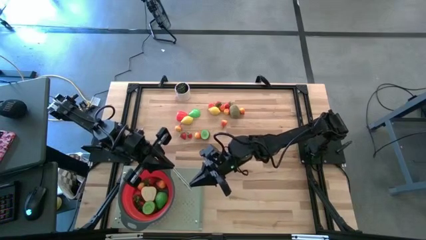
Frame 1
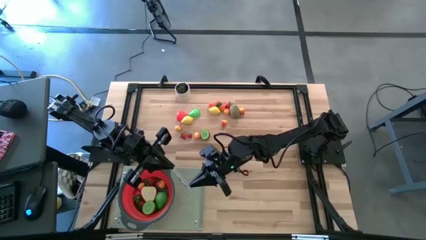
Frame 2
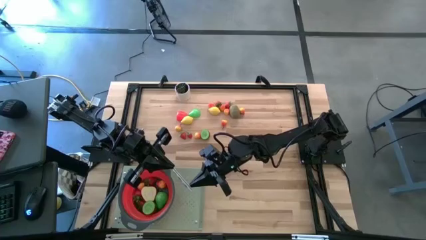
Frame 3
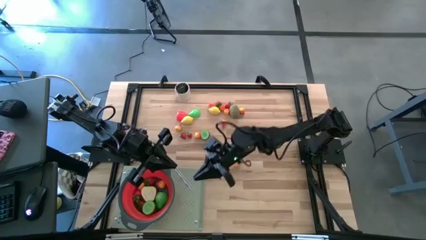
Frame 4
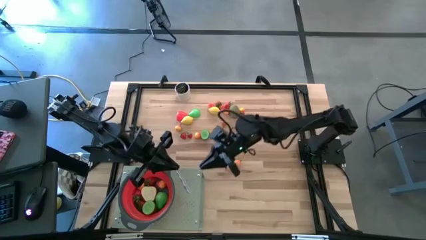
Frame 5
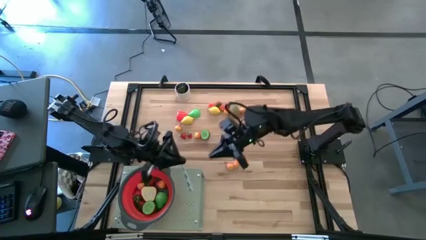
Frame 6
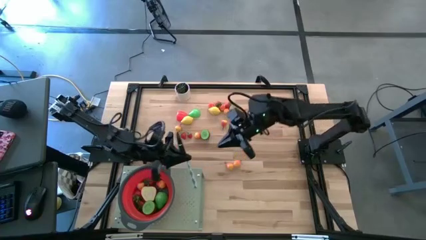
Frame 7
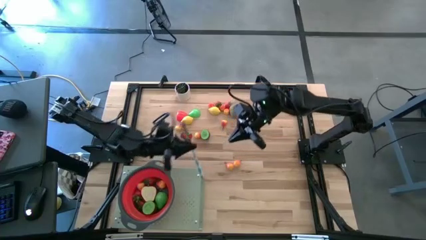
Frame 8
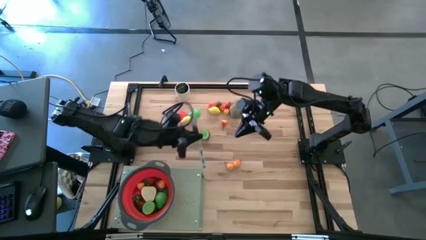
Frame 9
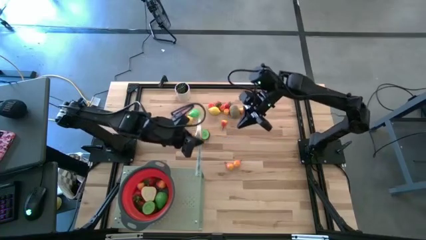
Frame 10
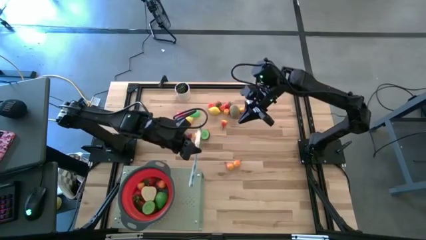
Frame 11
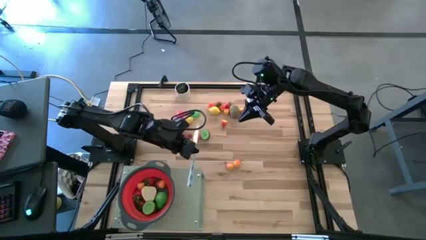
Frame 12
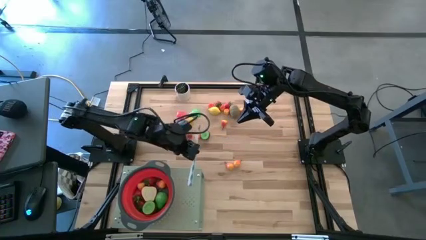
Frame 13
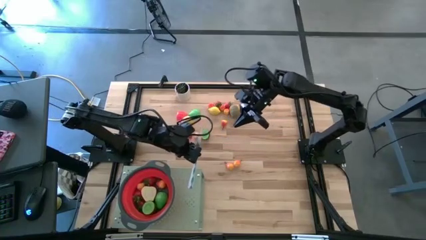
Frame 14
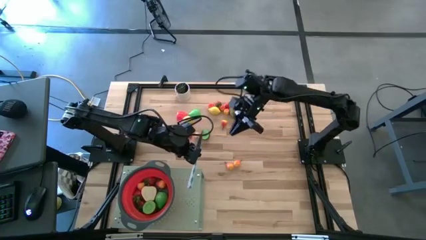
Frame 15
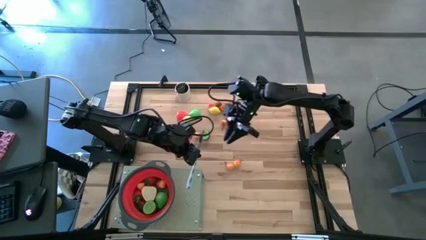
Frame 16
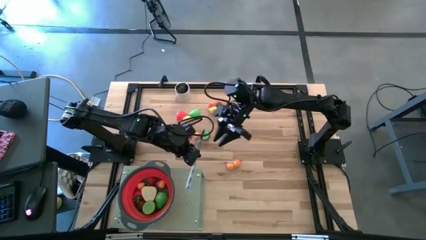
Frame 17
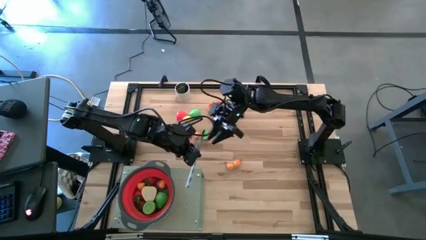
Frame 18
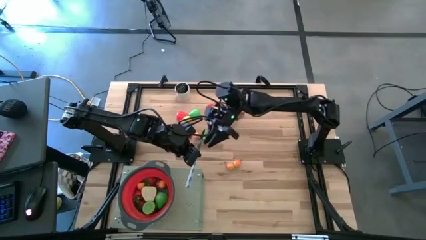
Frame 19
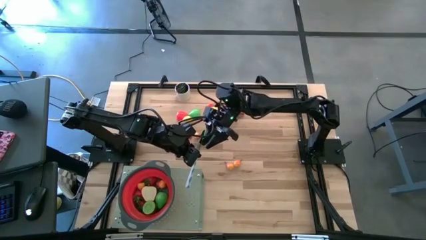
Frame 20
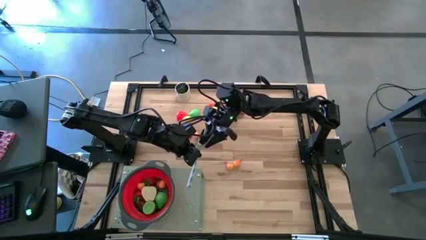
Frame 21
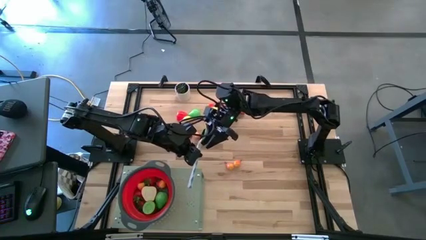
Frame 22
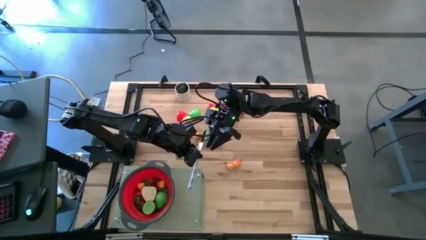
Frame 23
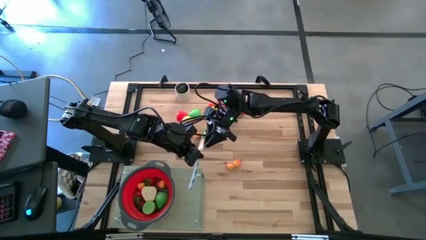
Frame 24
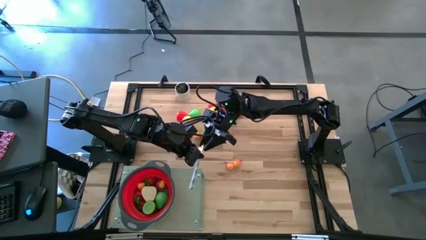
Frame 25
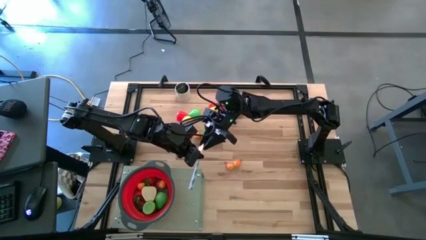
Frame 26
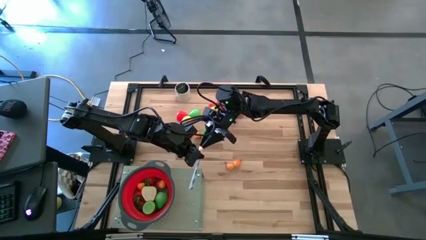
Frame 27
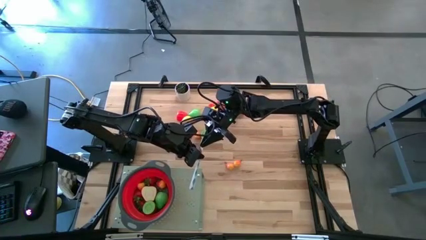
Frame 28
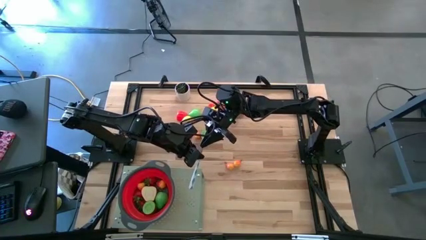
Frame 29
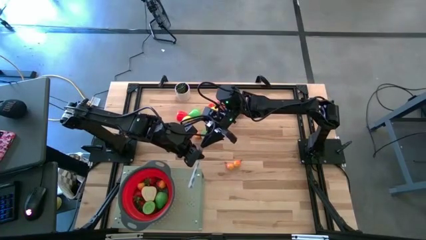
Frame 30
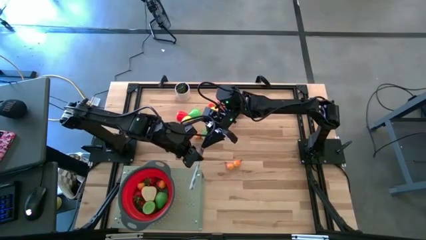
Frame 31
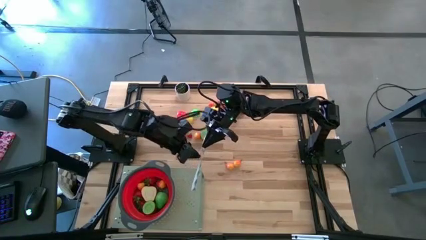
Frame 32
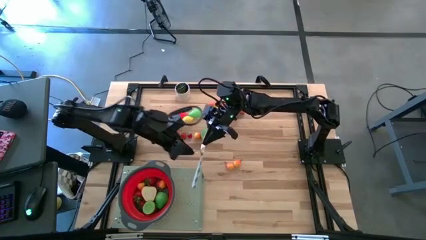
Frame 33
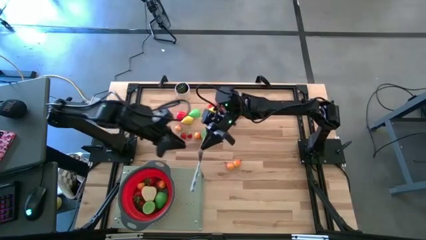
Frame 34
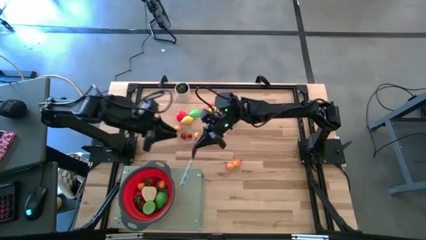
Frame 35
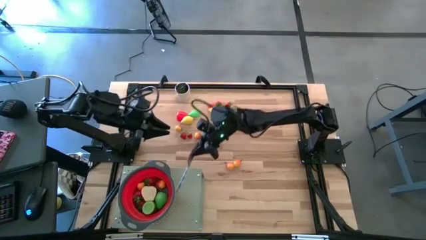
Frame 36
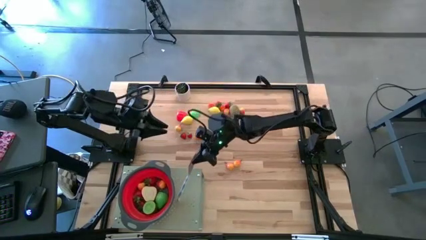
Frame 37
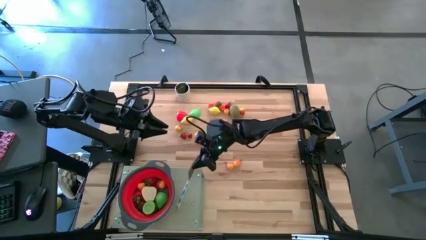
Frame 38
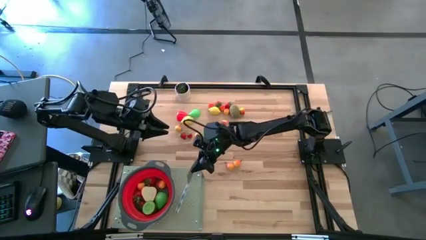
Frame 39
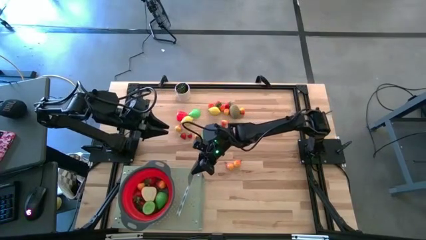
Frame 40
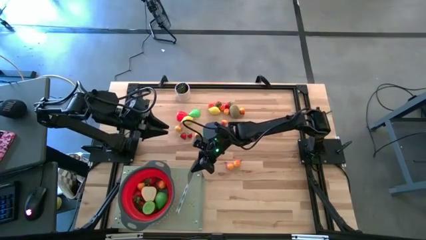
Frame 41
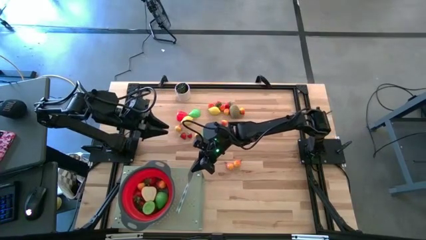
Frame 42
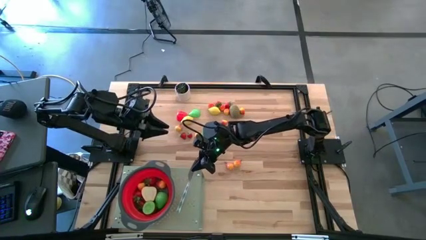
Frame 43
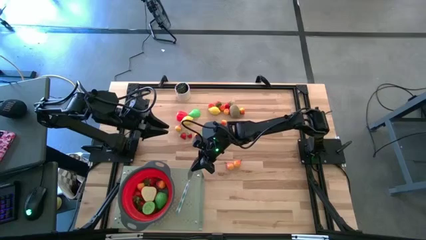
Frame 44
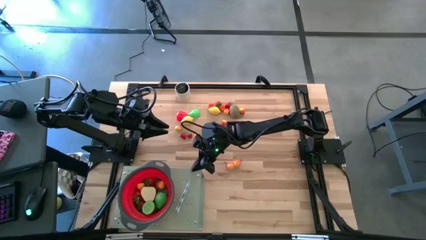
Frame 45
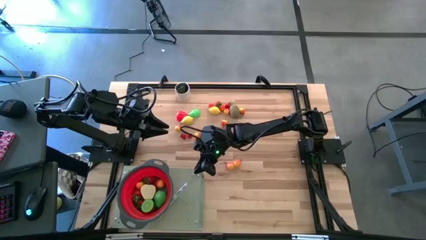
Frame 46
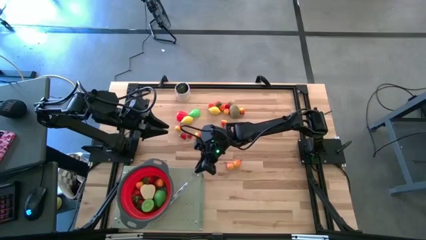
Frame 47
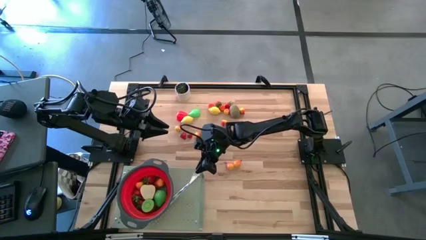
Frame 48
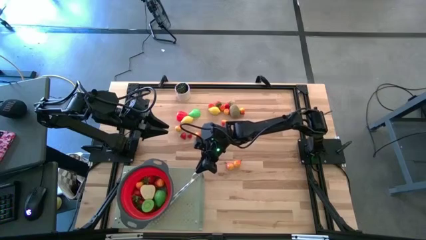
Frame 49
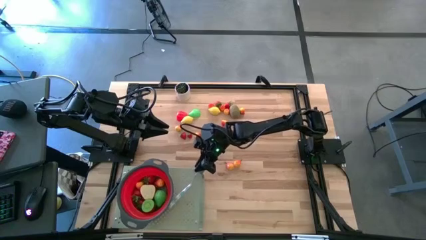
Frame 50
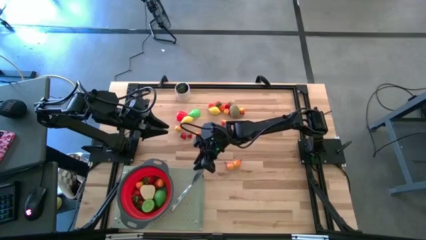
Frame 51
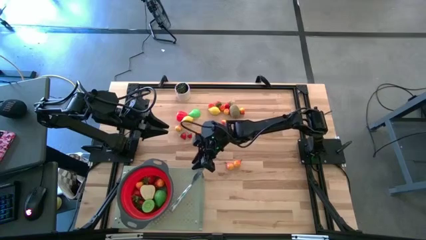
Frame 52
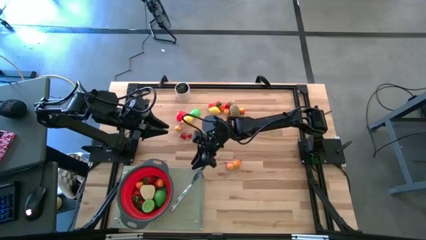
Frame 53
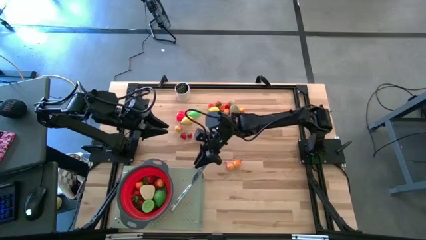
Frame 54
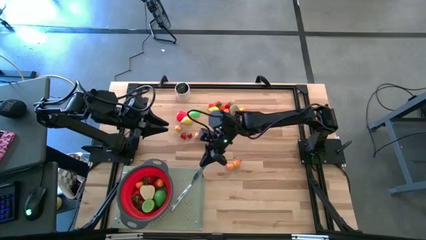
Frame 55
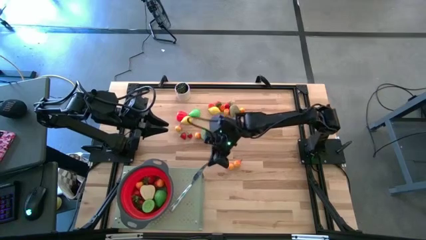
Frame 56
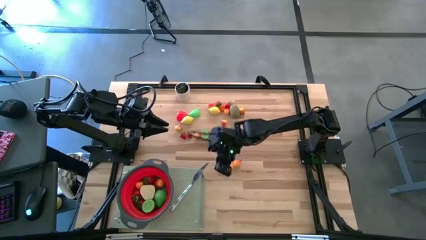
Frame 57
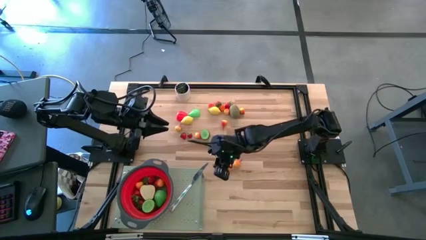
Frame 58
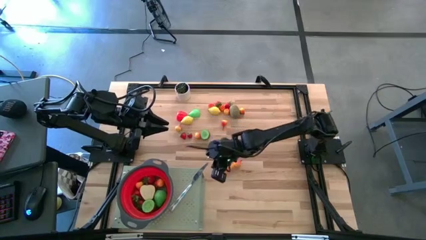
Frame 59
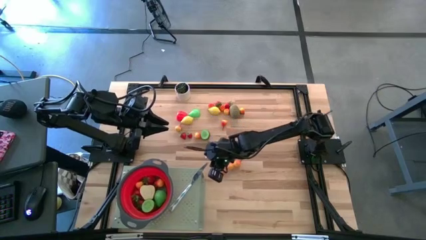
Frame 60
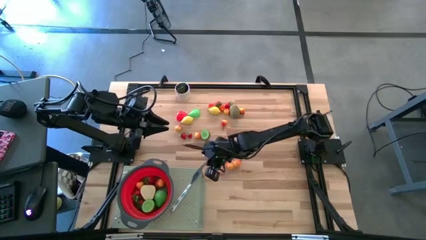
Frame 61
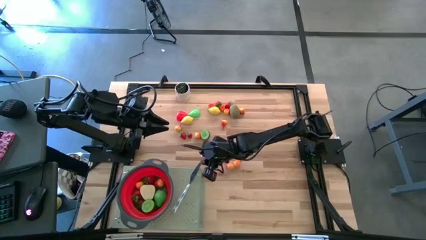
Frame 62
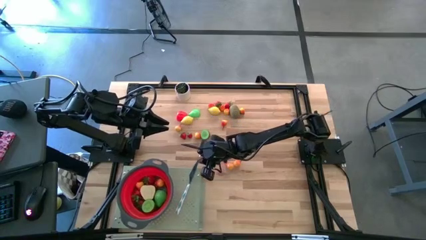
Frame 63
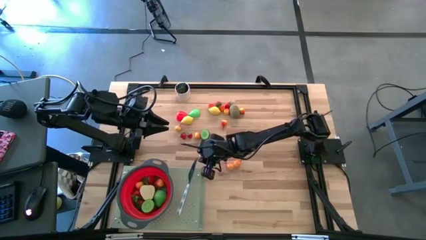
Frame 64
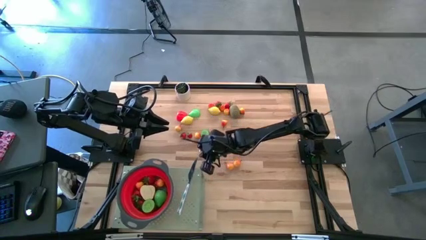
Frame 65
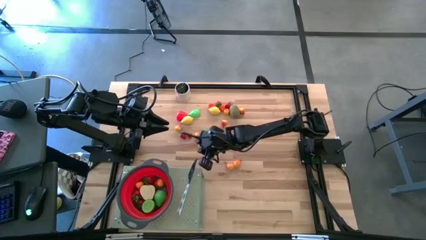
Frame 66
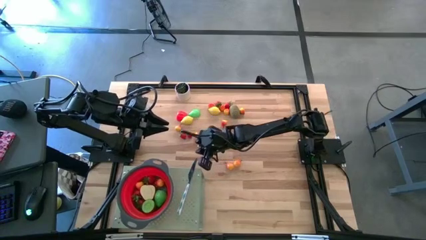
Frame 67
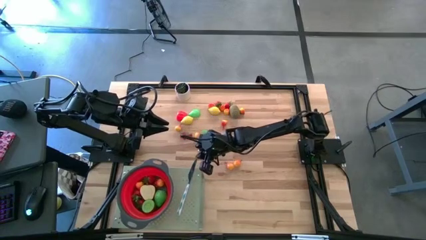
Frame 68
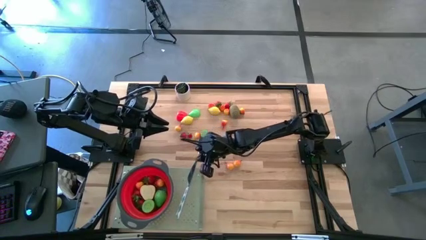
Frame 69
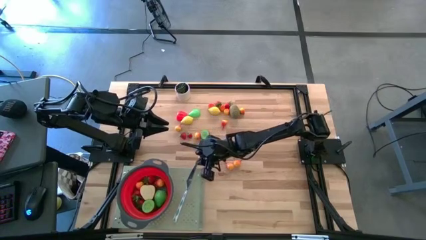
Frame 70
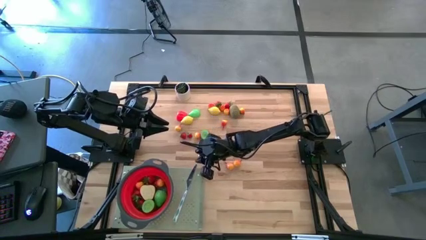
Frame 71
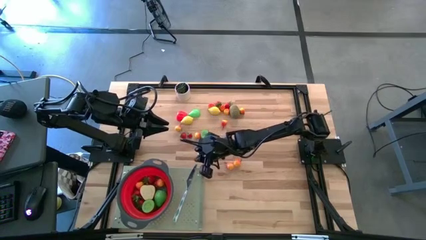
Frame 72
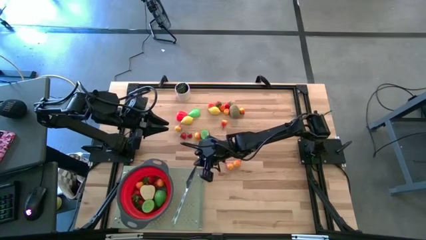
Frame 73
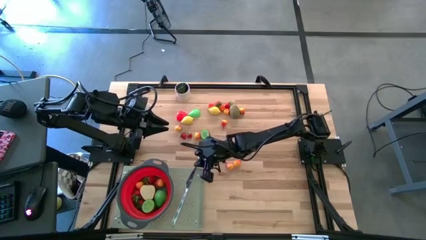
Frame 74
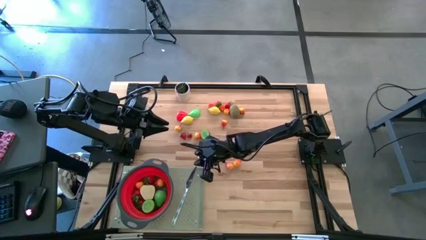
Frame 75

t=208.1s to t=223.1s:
Task: Pick & Place Fruit
Put the table knife on the shelf

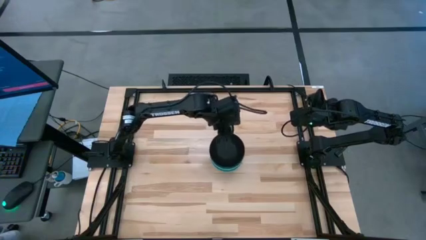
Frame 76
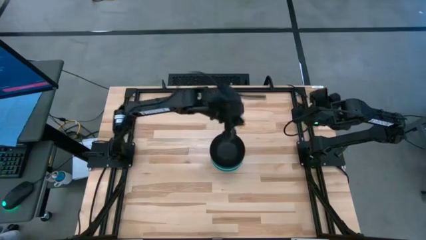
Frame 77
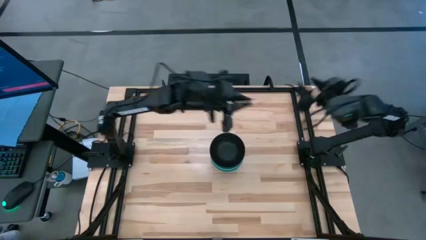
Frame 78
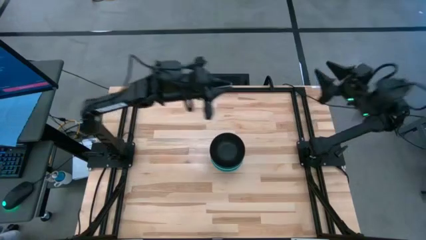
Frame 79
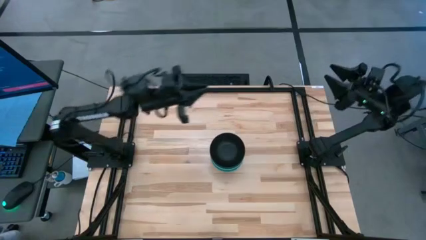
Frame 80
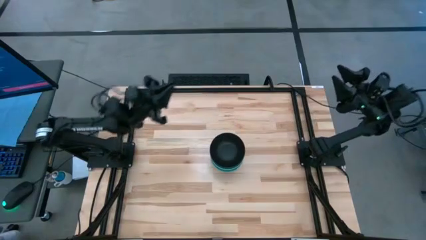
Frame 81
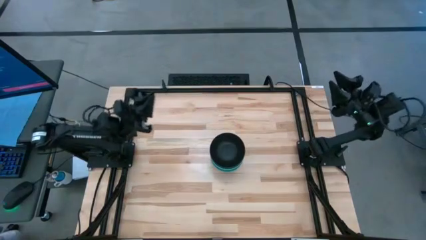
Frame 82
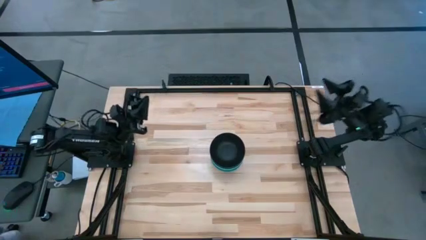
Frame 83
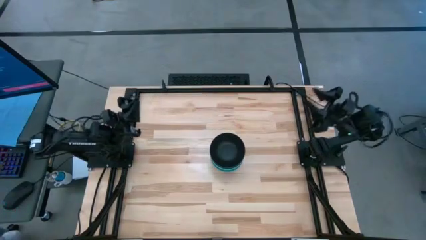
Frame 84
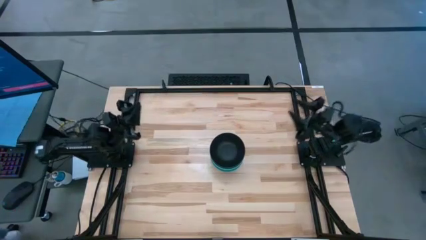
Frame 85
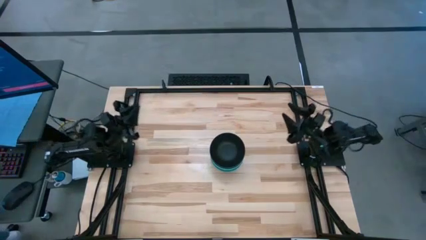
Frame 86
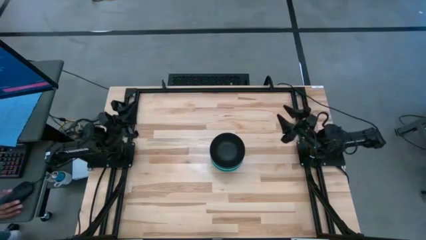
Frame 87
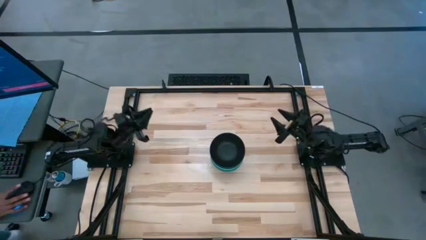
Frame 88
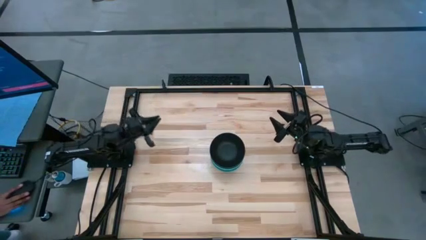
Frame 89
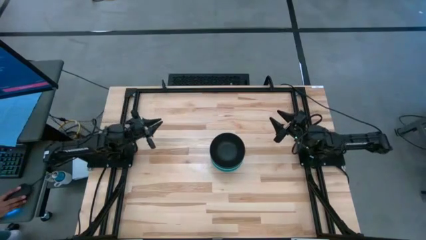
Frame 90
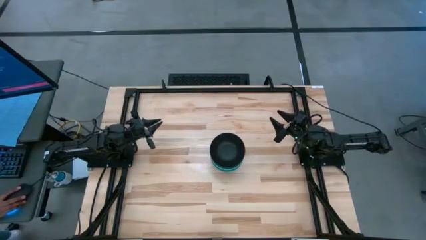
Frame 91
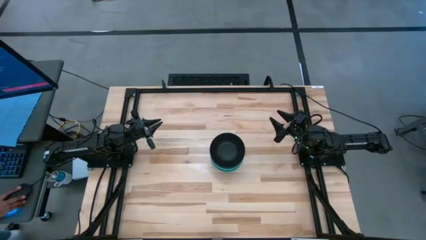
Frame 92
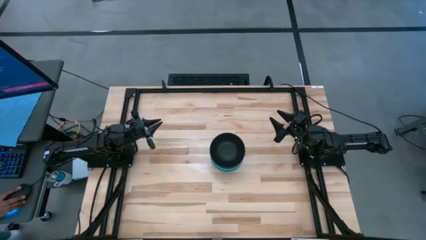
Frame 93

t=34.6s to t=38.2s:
Task: Nest bowls inside each other
Return to Home Position
